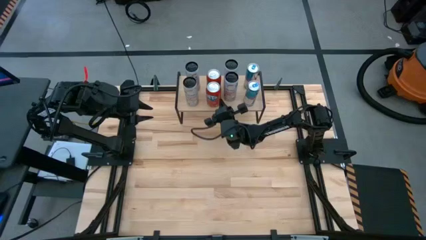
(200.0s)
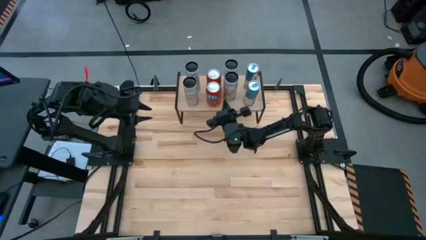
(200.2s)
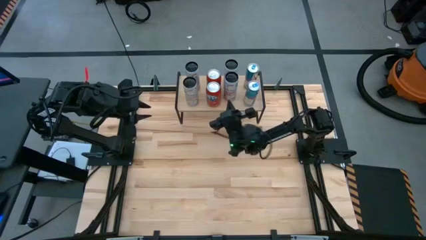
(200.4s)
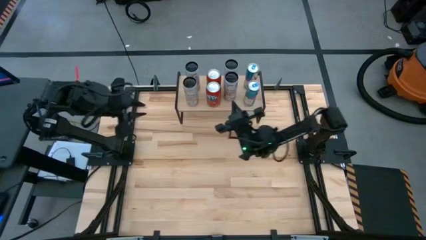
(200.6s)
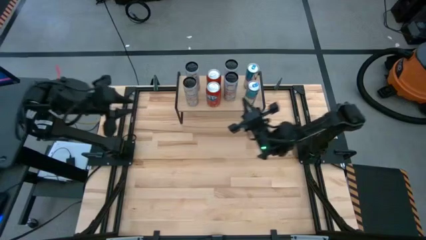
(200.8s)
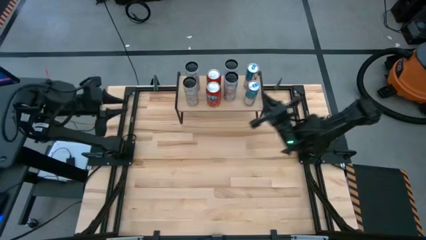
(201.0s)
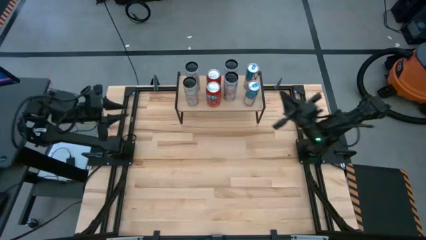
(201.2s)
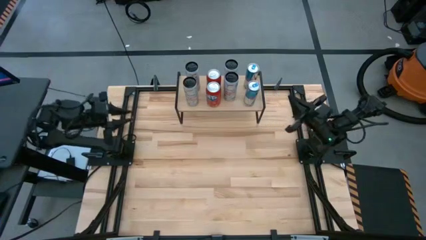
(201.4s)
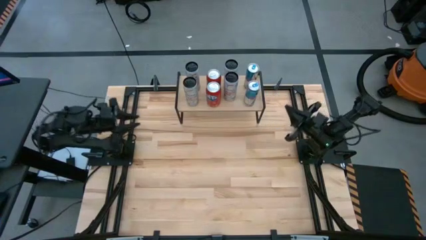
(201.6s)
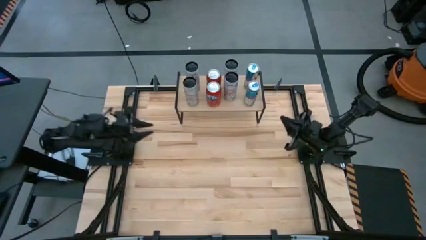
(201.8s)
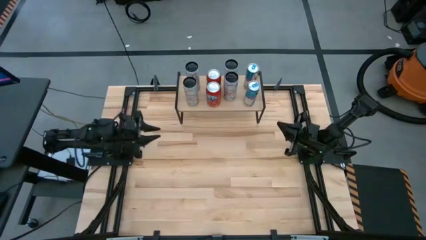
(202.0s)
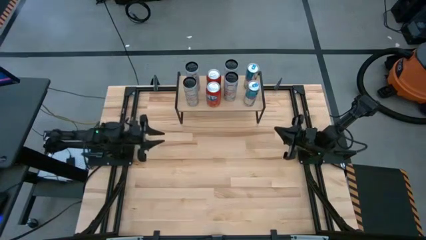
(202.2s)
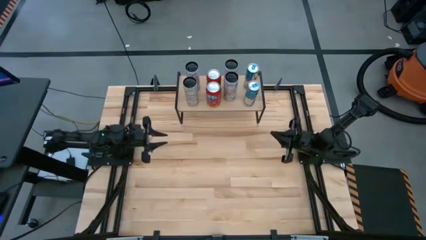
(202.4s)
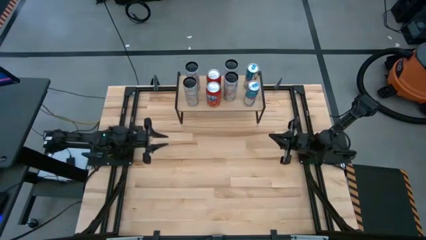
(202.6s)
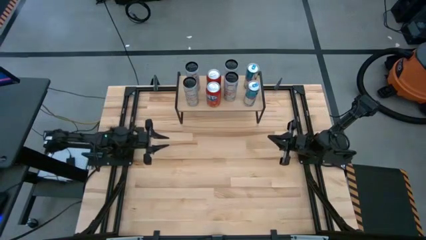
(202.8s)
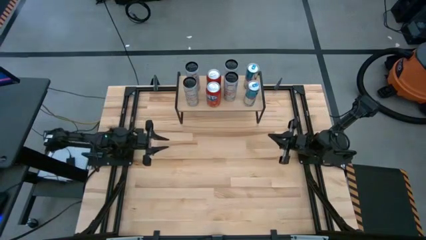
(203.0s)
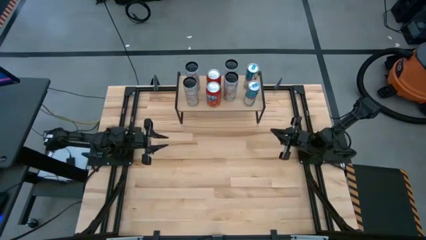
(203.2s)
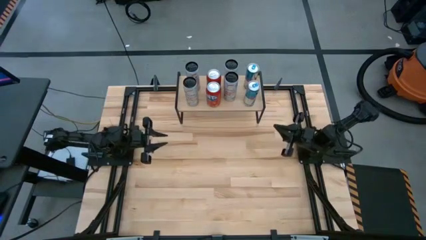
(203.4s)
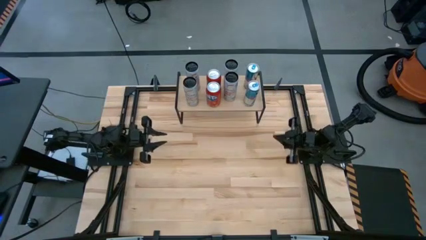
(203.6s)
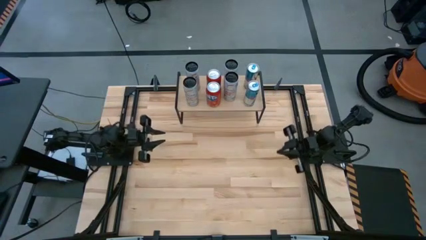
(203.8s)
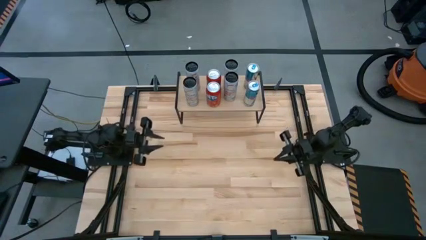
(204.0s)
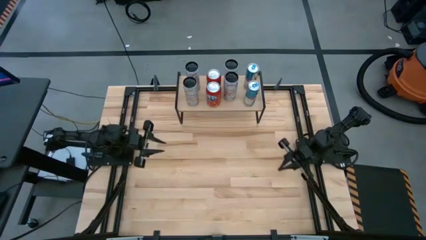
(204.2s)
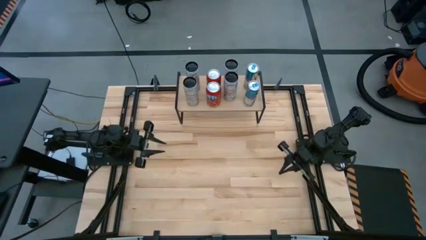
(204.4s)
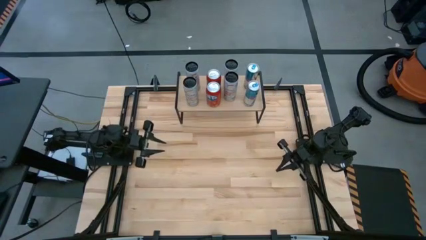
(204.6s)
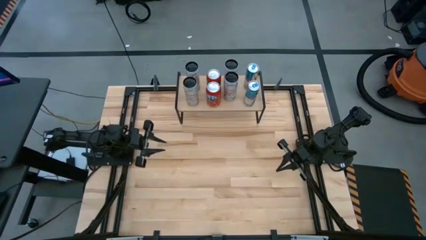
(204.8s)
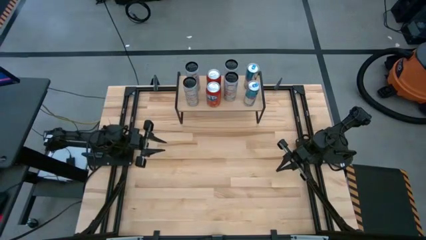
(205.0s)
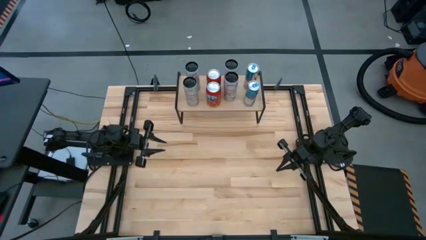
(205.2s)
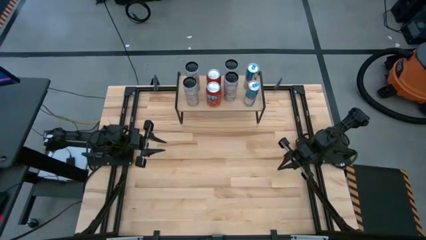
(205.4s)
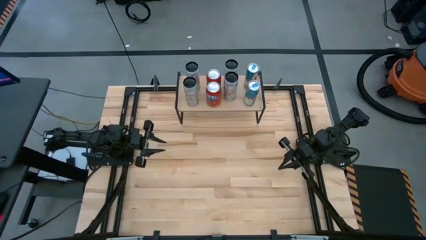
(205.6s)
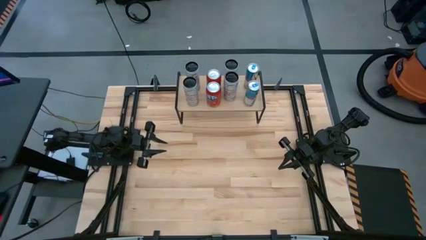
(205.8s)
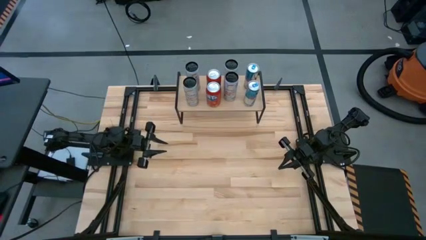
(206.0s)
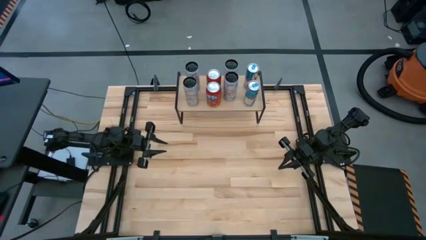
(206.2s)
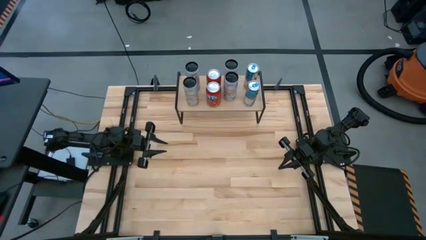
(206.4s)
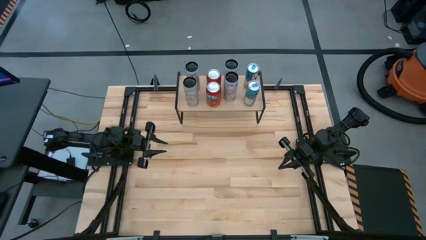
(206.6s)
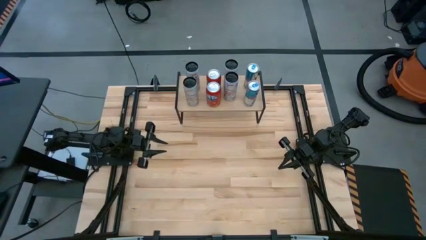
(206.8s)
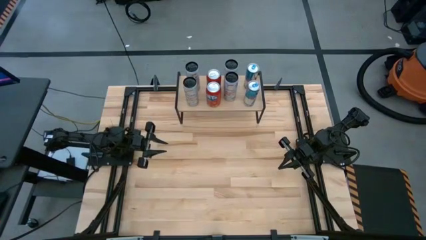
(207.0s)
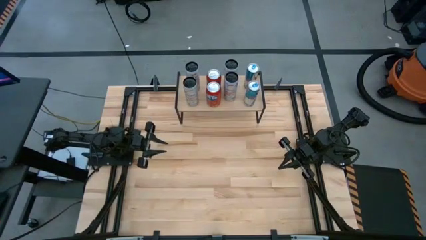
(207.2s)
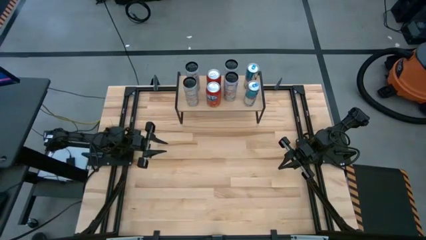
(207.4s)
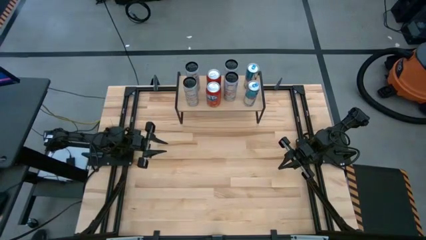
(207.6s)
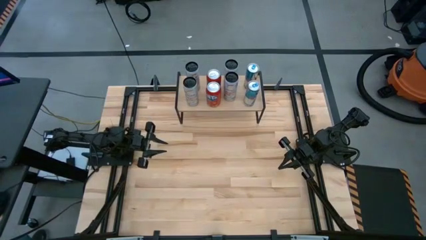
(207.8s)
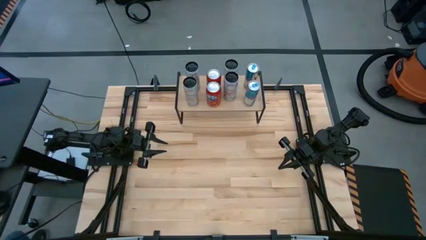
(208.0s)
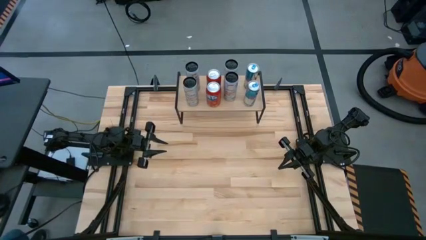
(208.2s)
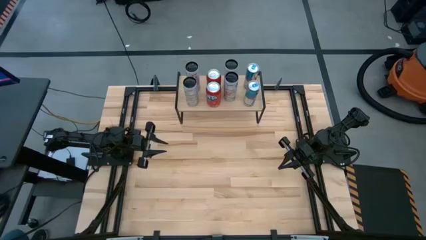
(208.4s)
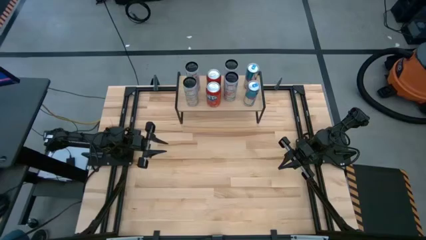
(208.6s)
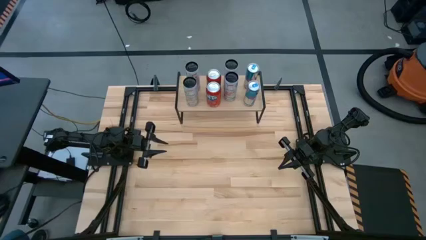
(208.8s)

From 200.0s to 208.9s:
Task: Place canned beverage on shelf
Return to Home Position

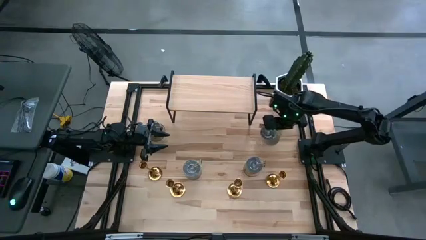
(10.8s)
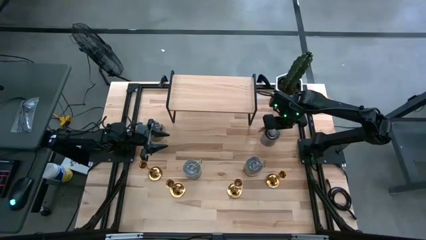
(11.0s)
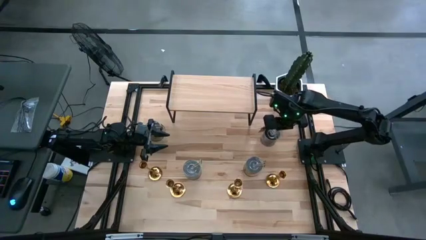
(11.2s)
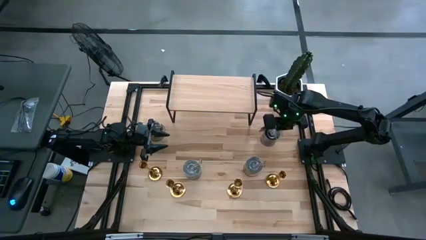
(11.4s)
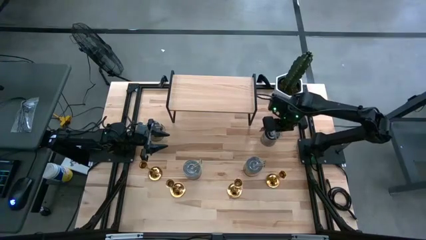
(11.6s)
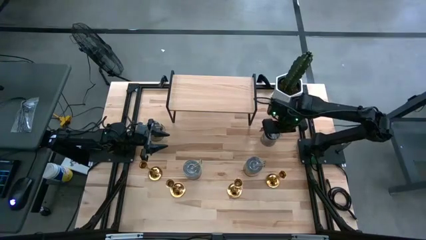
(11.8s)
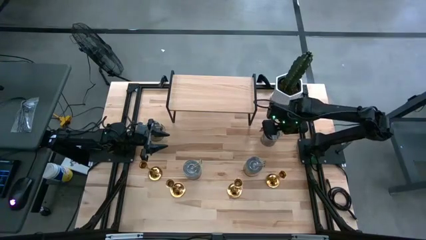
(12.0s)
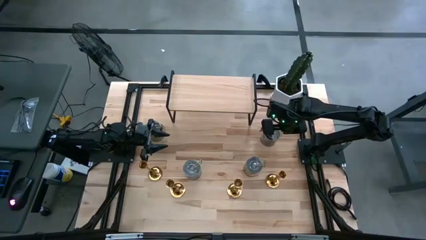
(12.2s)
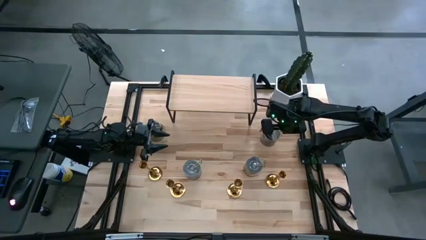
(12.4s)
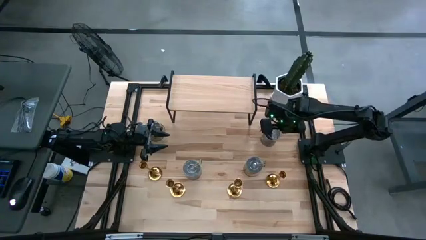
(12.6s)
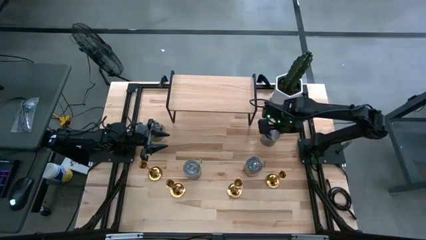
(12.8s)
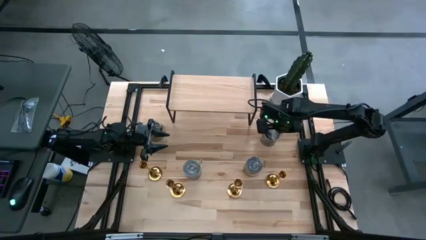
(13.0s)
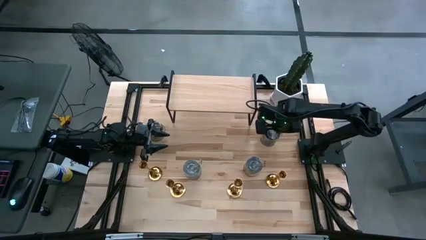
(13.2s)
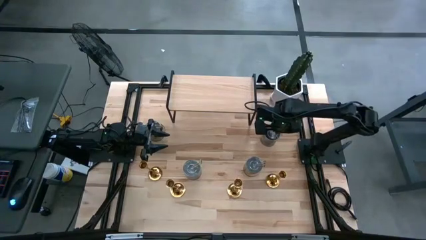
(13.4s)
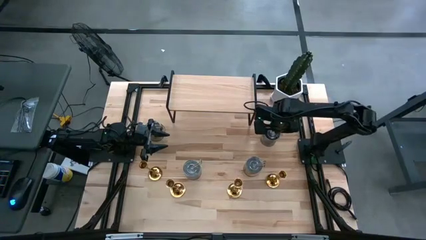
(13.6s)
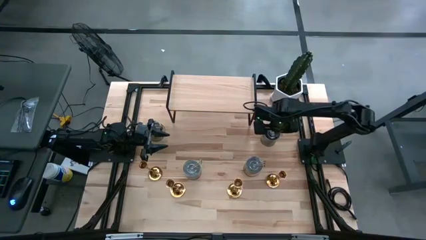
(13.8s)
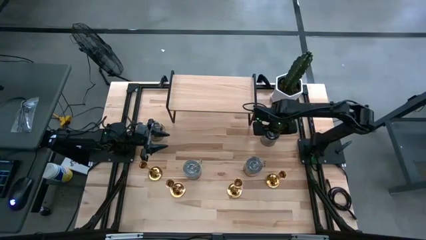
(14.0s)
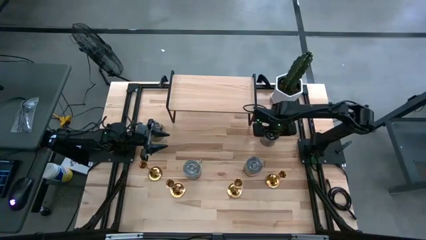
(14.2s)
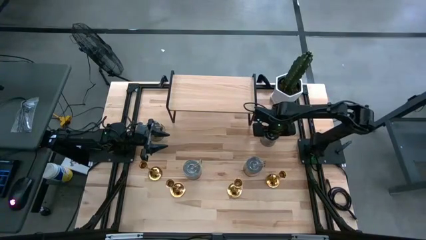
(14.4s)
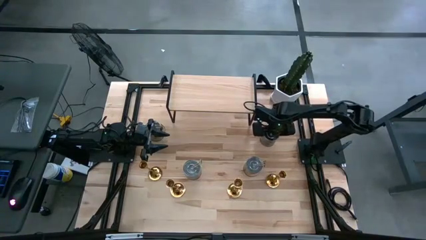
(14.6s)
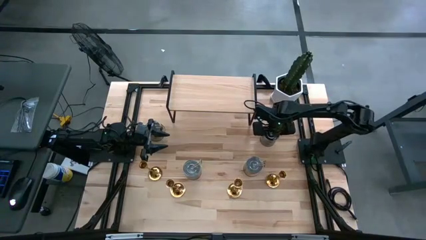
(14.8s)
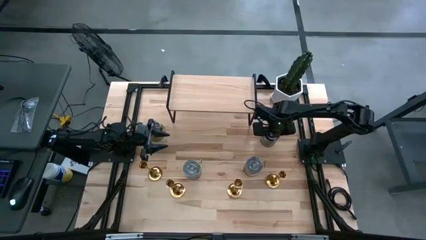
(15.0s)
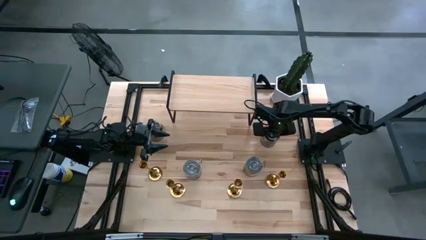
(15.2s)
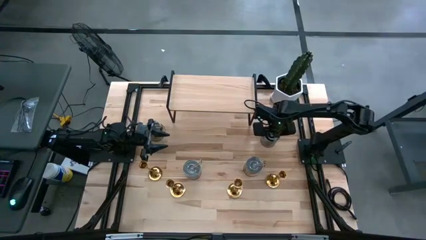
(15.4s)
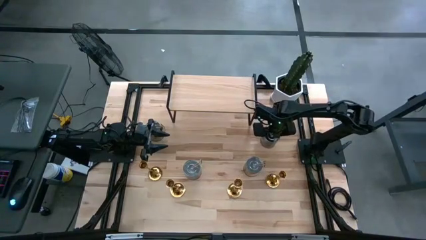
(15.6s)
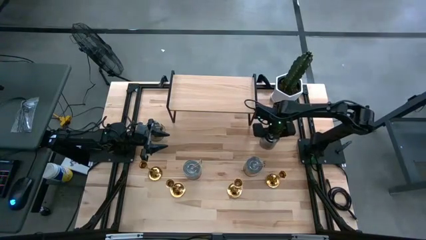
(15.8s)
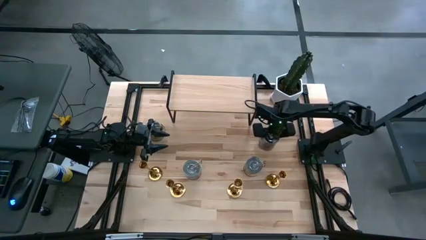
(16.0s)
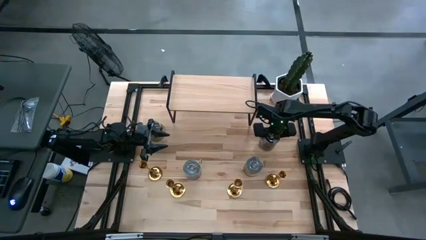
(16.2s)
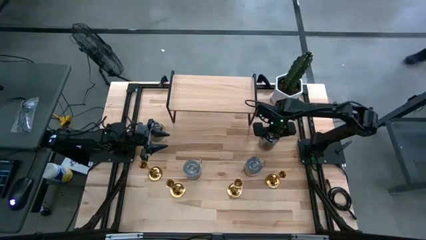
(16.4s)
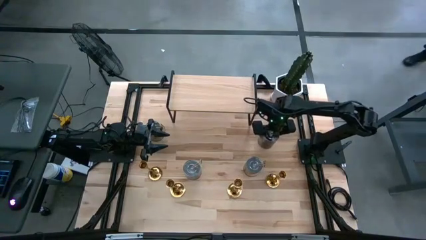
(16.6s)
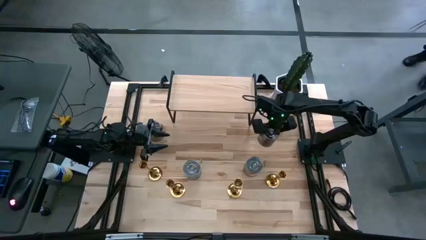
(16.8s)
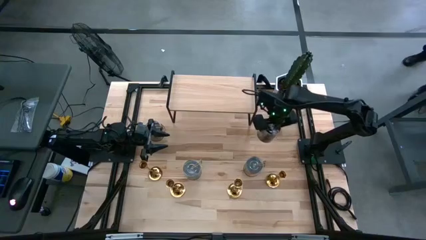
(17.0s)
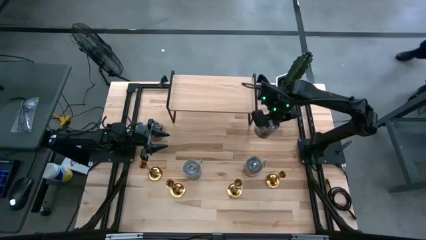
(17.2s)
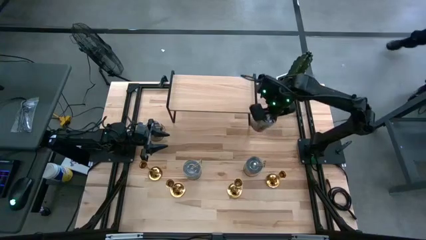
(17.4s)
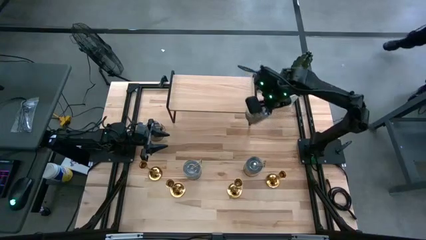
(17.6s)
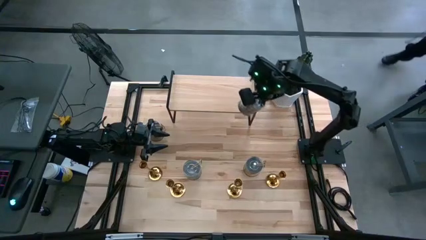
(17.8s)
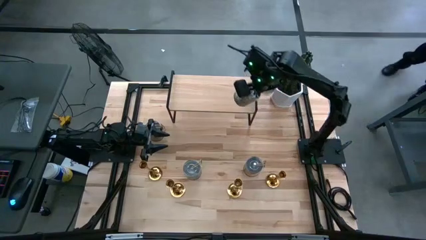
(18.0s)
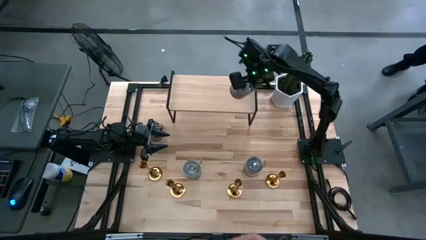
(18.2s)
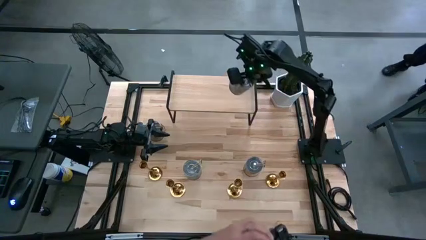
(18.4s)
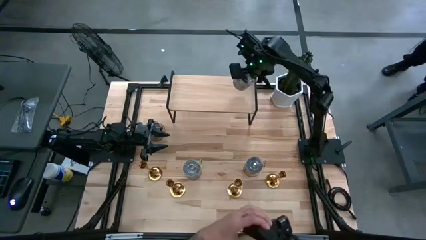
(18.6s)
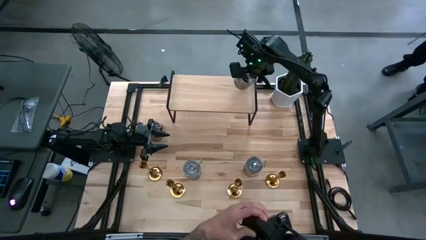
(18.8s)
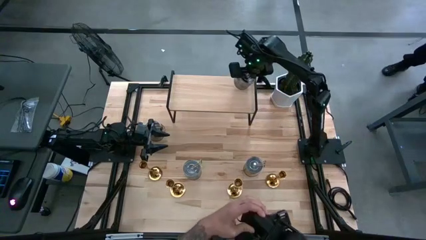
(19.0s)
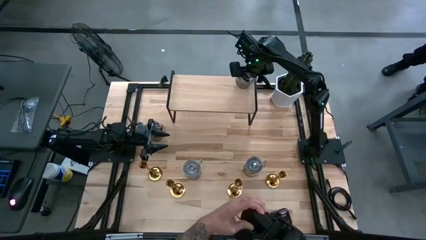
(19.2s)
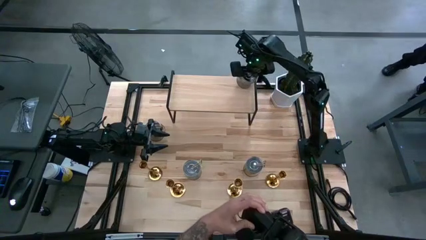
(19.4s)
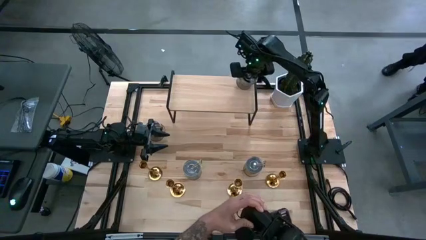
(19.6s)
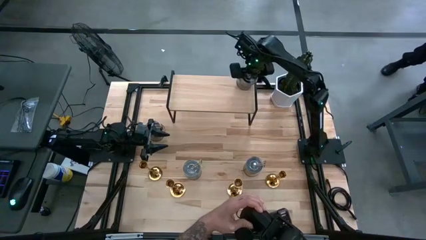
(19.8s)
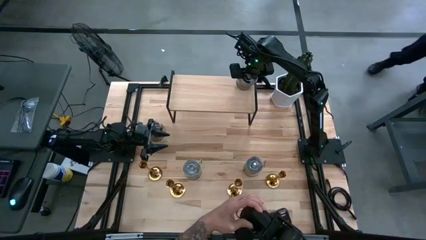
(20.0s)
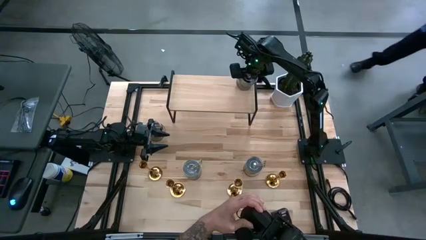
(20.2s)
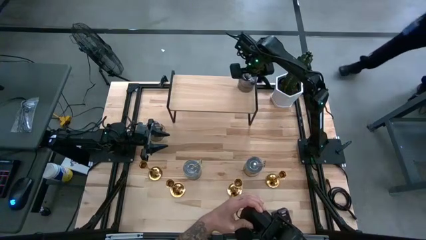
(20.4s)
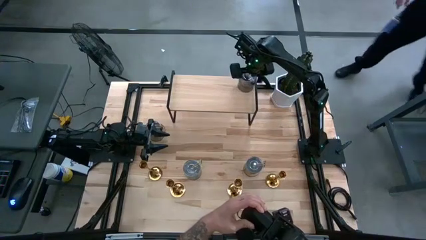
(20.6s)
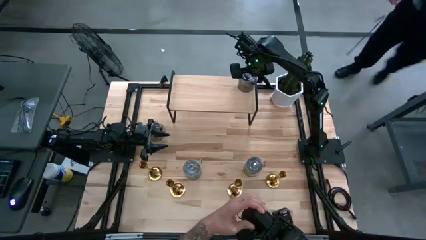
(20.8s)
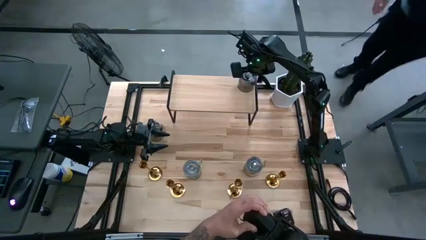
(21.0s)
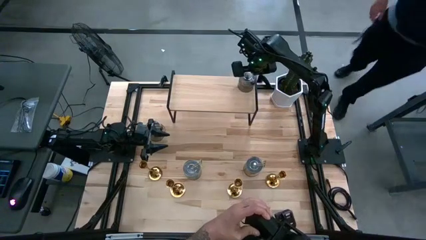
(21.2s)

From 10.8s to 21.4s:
Task: Pick & Place candle stick holders
Put the silver scented candle on the shelf
